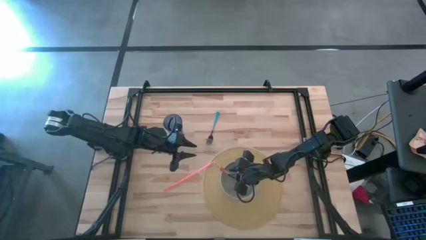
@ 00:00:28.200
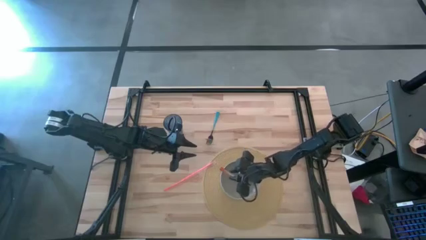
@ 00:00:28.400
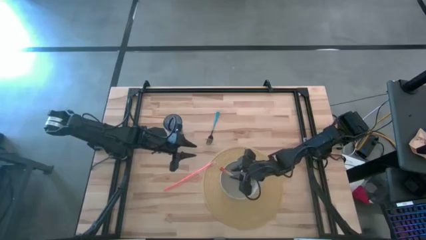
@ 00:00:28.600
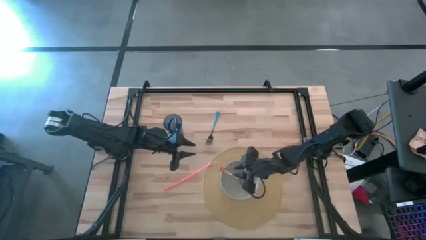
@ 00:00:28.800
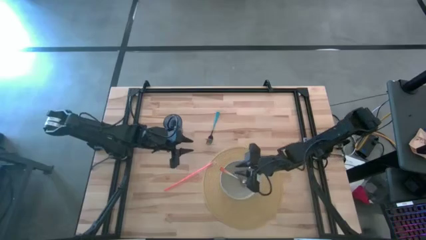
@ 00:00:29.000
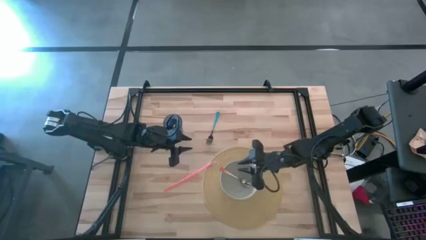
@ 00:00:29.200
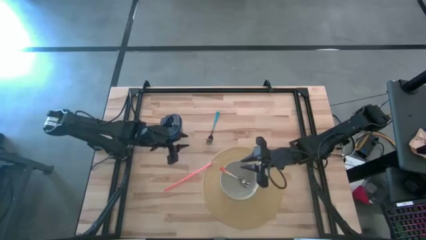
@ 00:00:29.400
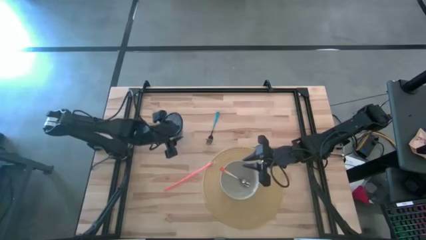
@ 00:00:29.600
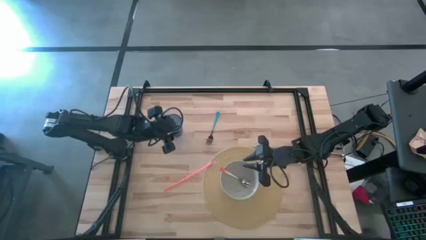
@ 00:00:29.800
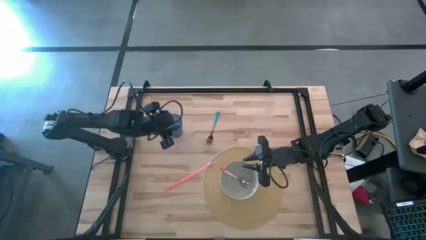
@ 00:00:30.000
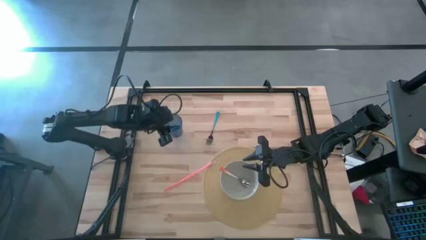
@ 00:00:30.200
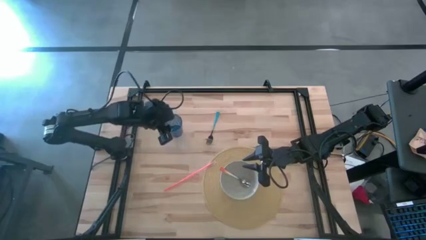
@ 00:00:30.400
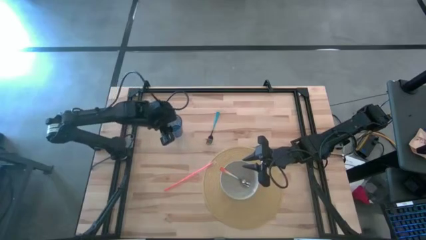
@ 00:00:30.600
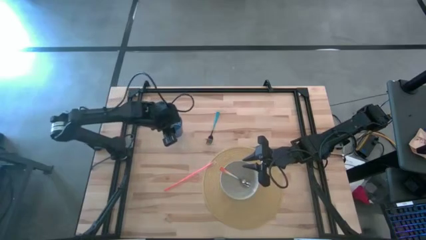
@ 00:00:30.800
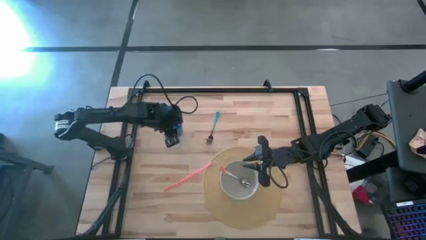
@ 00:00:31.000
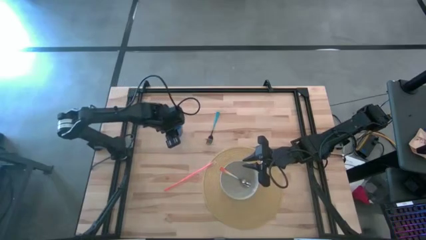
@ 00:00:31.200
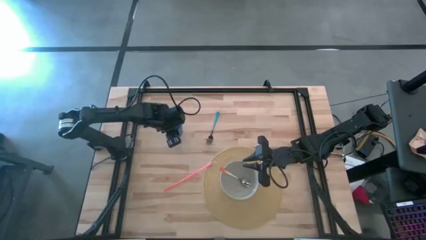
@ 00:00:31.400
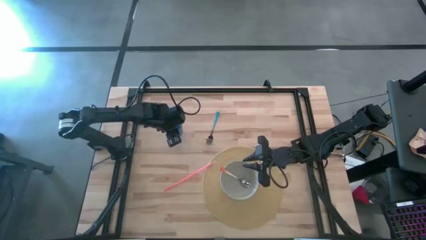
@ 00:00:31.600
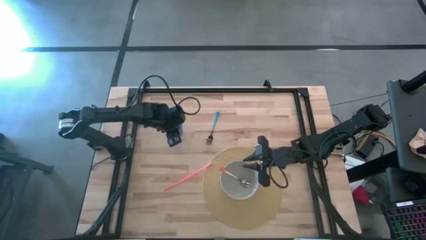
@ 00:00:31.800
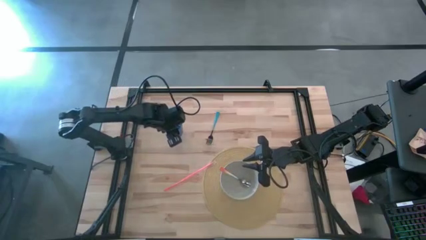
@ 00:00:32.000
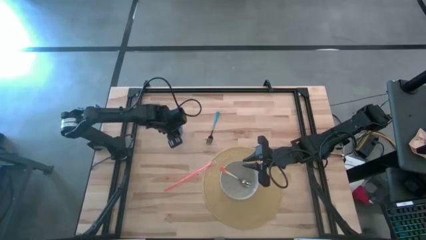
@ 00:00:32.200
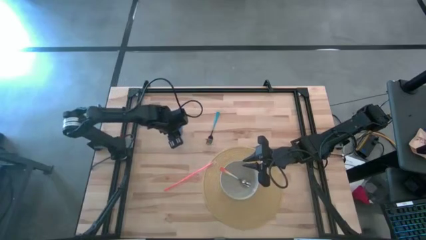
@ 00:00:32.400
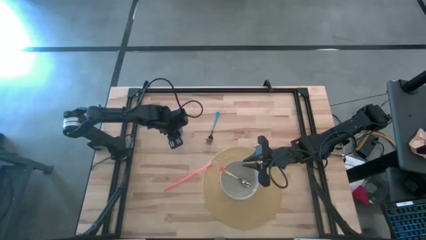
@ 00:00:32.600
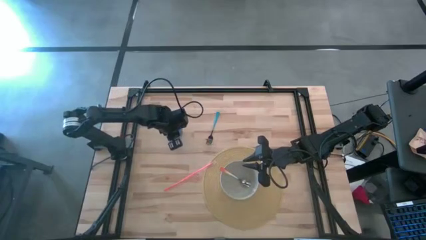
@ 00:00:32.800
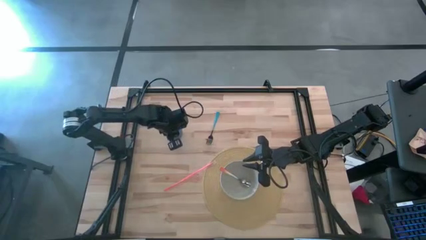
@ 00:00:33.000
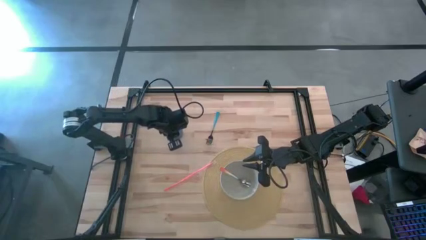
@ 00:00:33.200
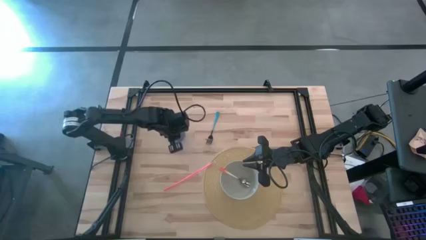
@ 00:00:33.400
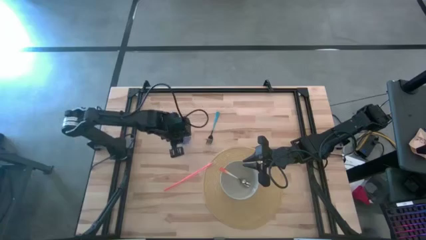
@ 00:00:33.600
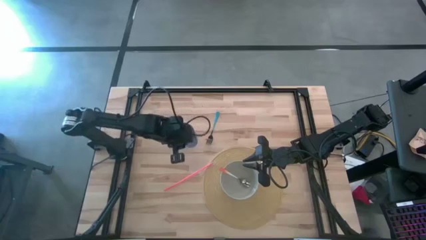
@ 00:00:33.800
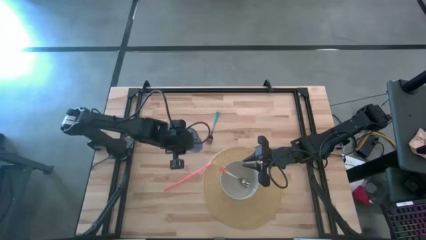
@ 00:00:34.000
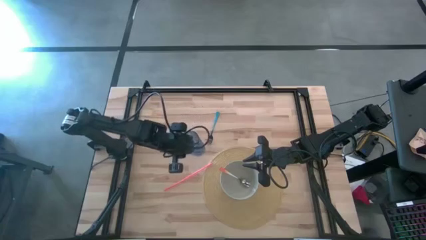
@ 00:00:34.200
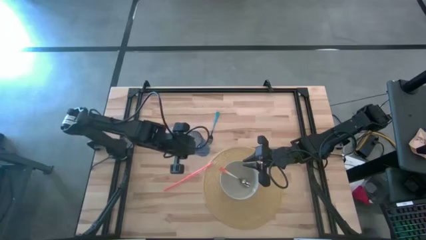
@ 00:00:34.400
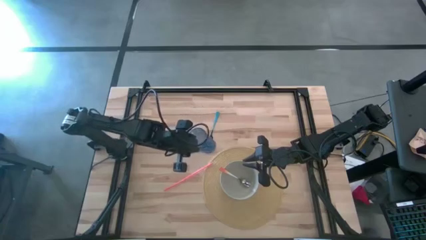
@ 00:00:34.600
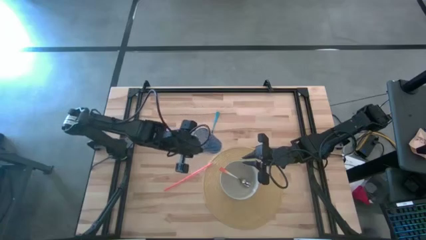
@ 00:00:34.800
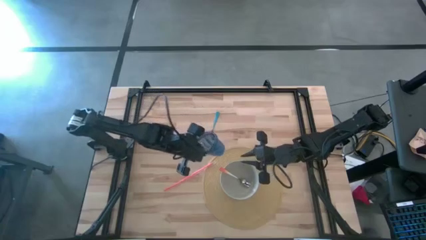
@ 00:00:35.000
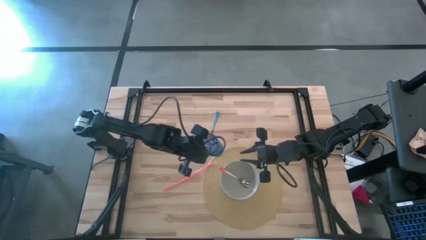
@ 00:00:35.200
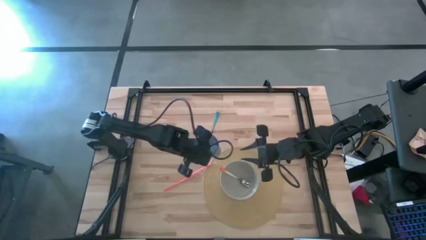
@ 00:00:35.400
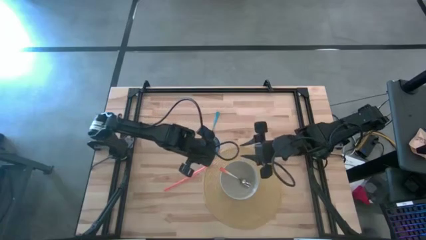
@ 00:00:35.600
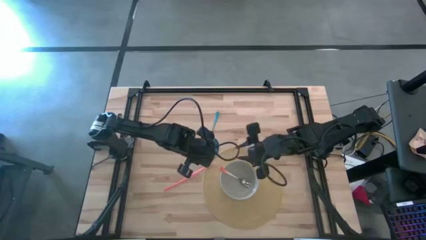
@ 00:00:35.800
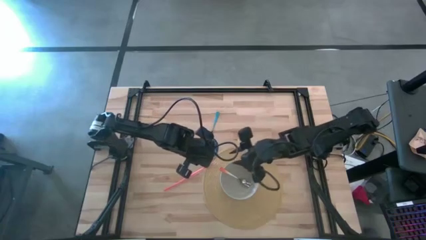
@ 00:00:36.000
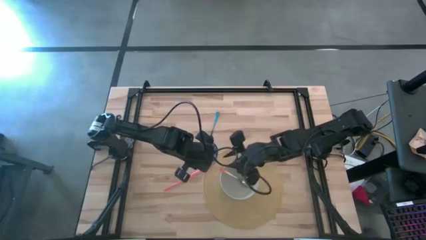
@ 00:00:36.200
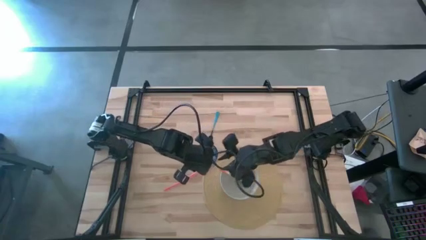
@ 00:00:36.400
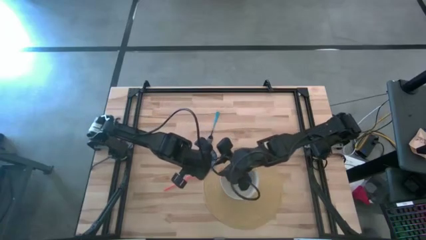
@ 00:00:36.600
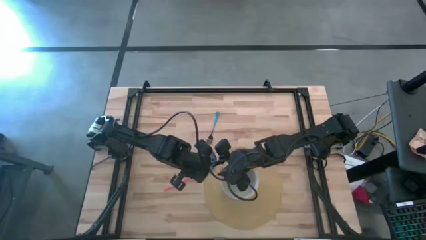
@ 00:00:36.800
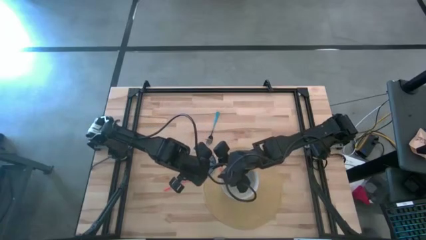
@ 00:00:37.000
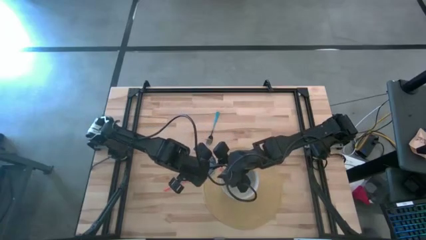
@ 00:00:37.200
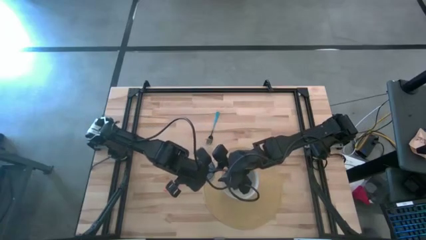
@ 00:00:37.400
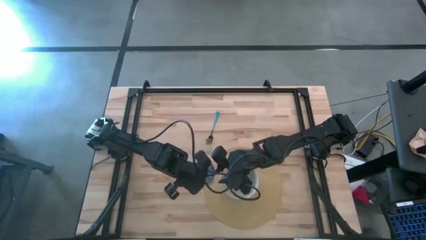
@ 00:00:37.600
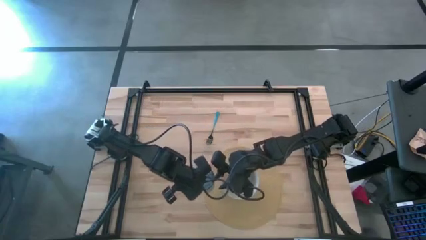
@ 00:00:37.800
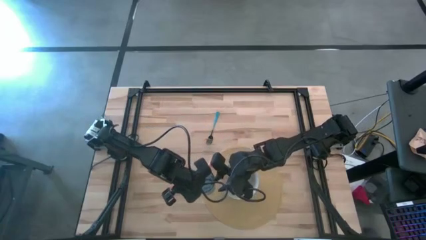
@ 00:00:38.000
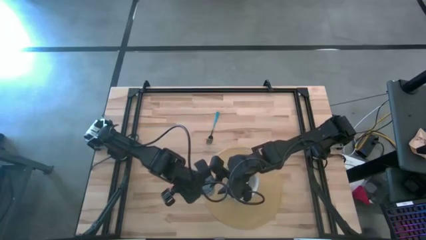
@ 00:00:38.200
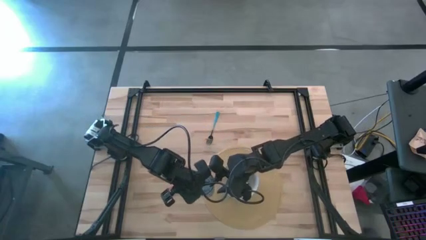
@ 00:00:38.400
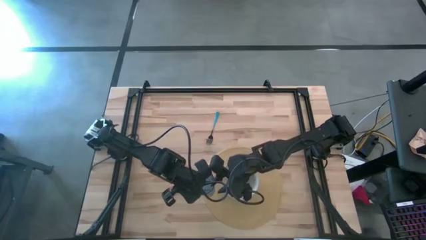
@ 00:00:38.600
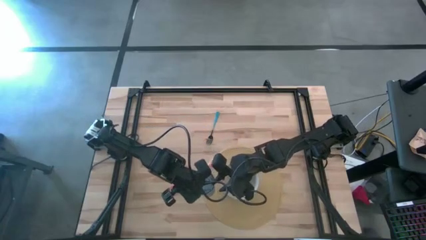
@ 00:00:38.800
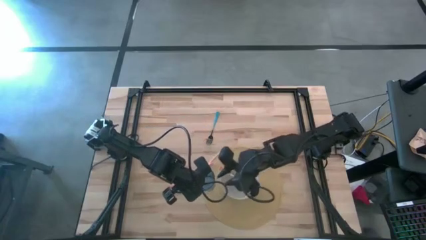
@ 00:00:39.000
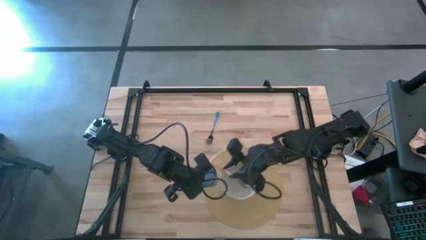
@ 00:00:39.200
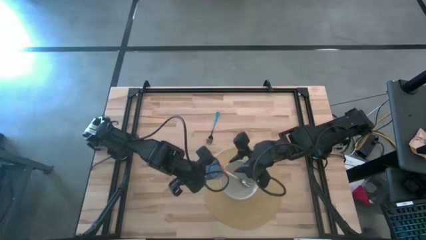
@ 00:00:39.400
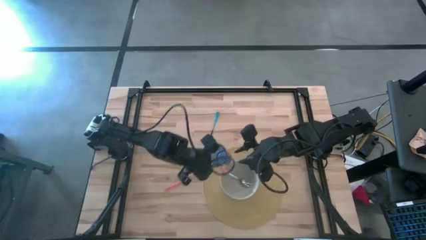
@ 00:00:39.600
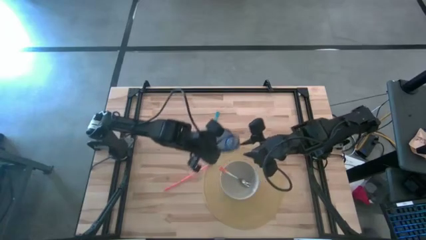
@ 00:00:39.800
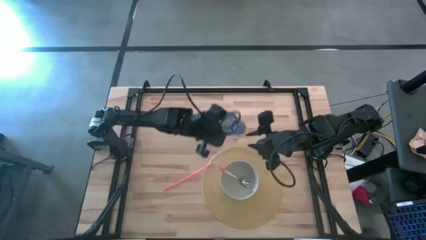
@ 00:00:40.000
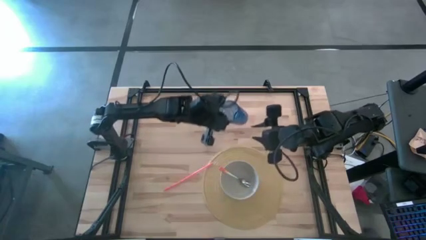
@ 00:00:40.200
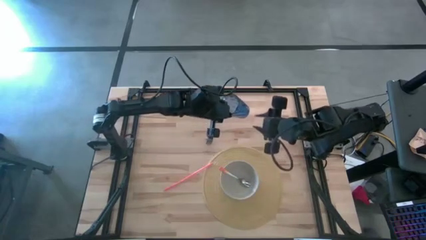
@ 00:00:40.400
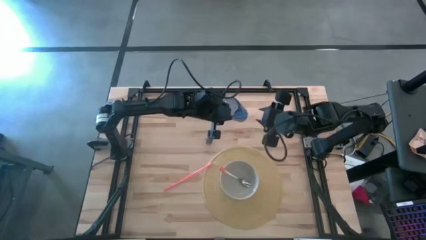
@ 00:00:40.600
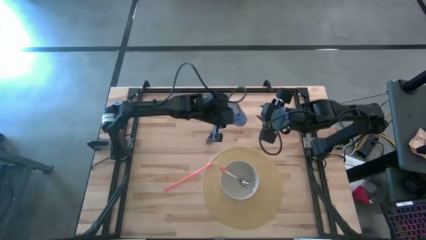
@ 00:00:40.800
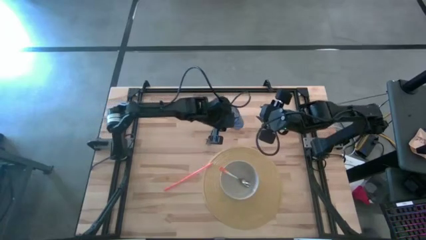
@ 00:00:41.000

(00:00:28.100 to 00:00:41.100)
Task: Pick & Place Utensil
Put the blue cup on the yellow mat

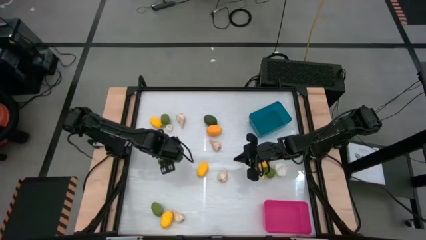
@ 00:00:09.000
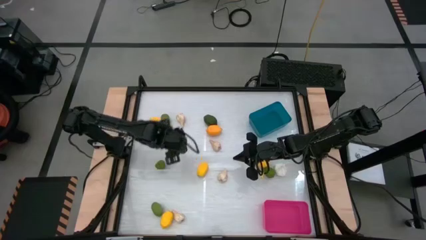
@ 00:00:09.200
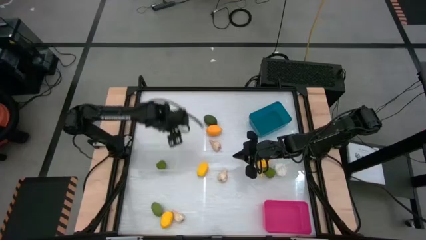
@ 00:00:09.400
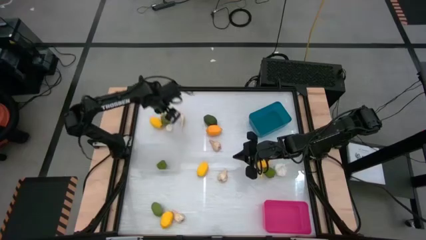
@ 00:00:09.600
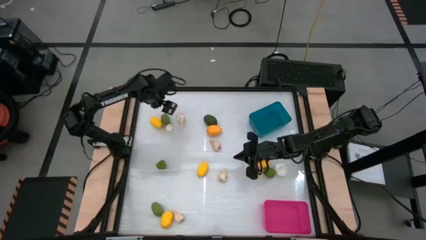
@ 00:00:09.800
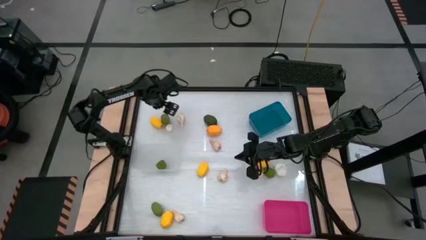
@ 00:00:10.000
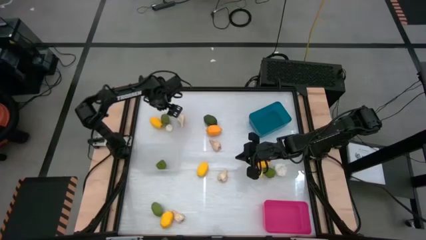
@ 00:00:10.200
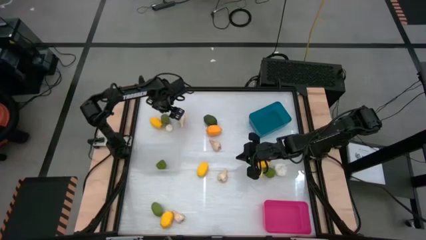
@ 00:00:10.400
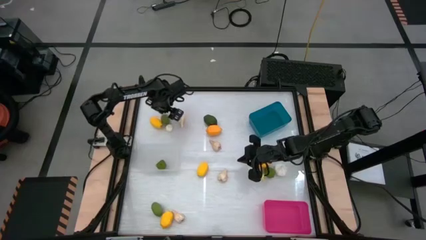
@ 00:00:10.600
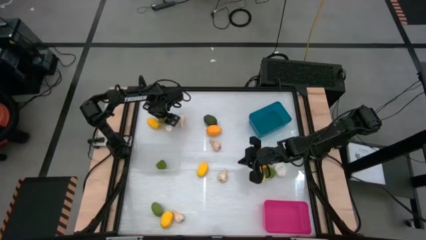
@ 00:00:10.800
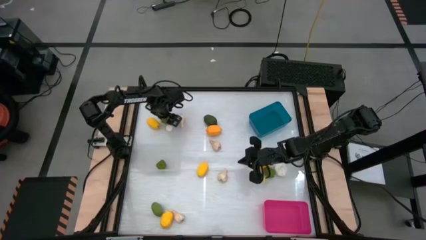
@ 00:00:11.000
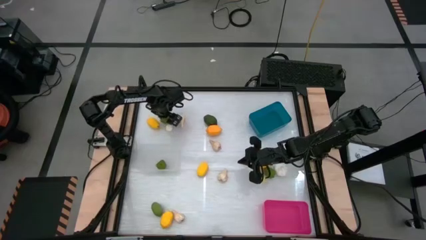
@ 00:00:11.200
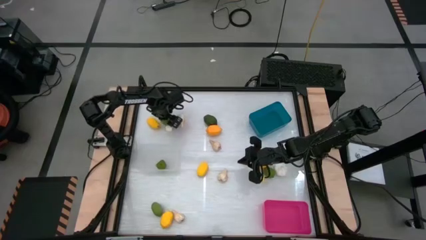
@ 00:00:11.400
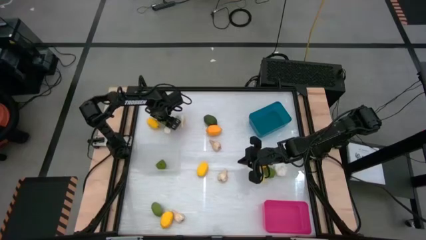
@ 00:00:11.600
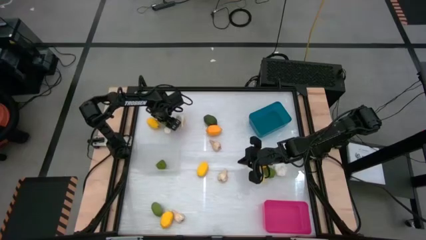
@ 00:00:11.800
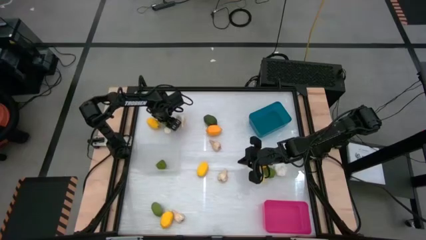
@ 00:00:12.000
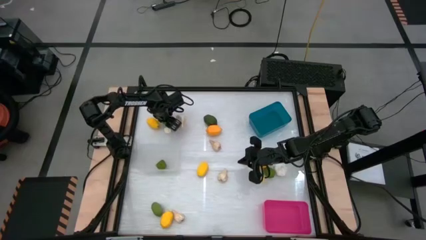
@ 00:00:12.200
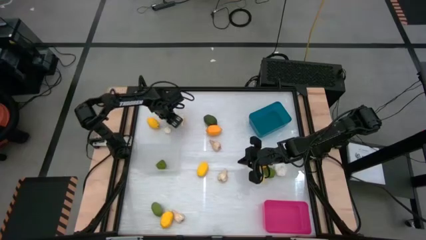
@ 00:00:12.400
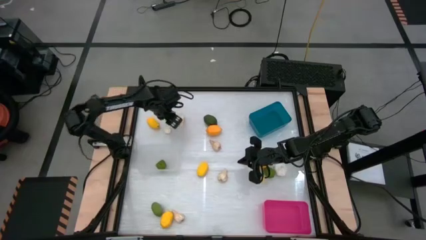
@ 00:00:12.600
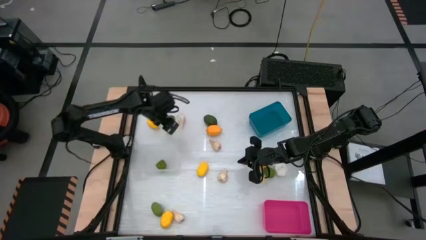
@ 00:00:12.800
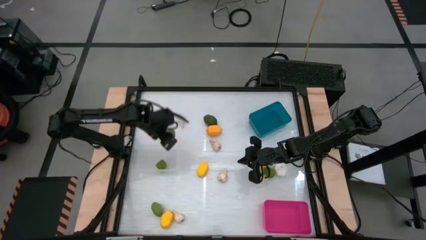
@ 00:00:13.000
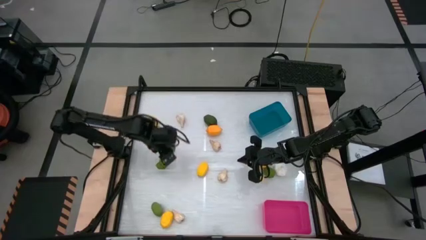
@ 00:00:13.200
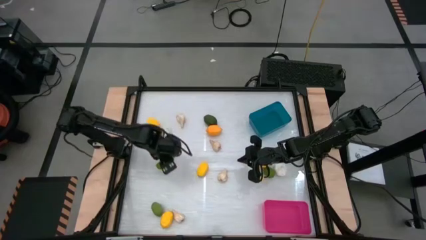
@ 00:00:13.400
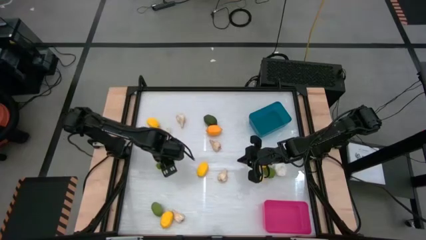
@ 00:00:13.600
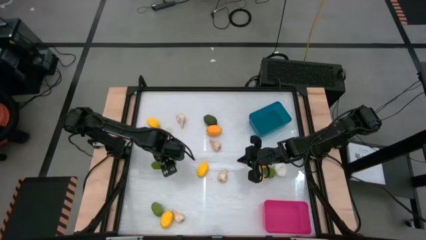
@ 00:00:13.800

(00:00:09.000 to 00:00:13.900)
Task: Sort produce into baskets
Put the green lime into the transparent bin
